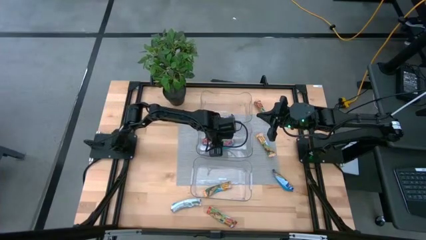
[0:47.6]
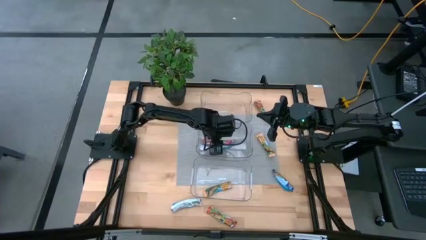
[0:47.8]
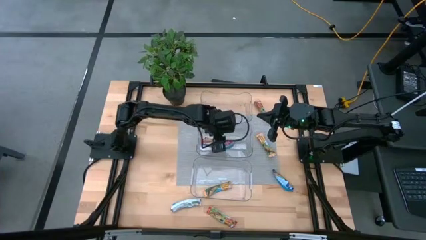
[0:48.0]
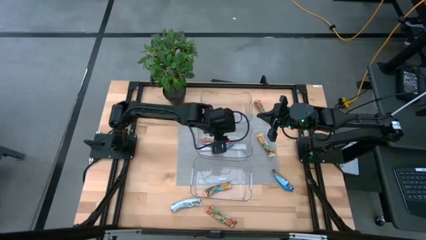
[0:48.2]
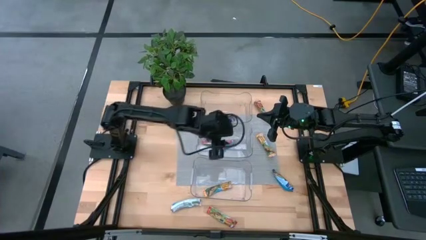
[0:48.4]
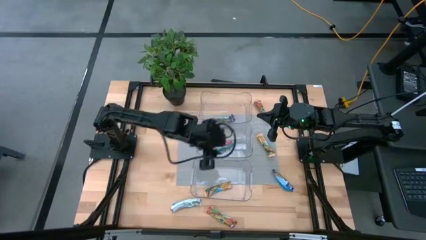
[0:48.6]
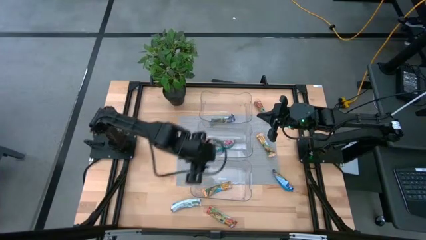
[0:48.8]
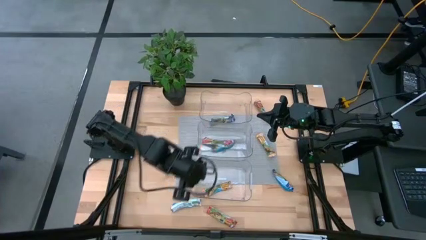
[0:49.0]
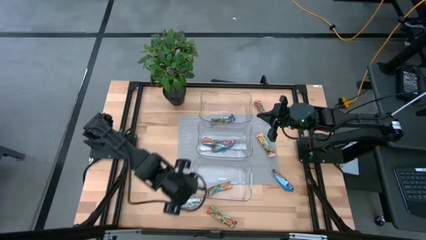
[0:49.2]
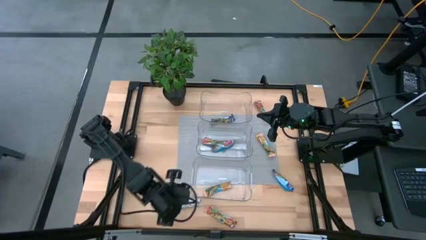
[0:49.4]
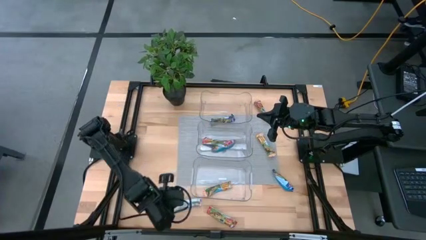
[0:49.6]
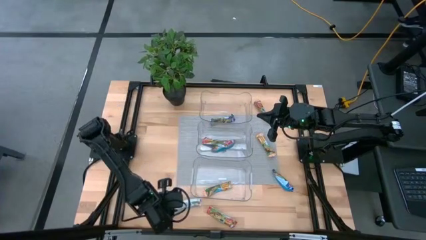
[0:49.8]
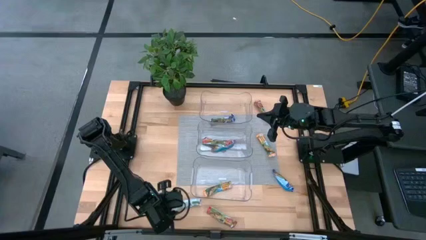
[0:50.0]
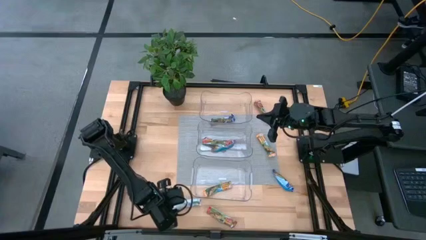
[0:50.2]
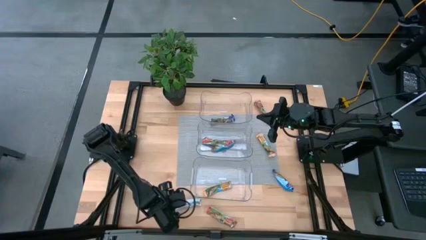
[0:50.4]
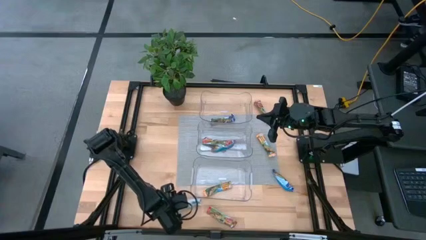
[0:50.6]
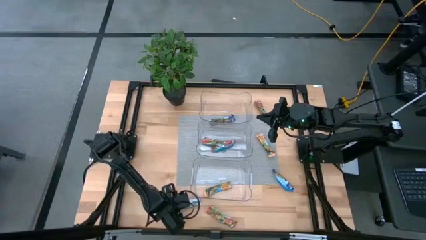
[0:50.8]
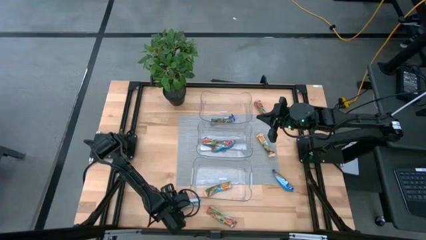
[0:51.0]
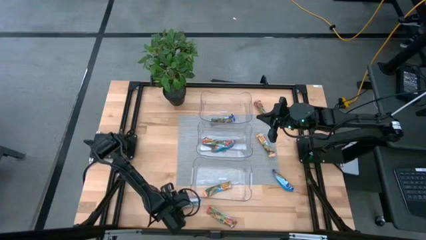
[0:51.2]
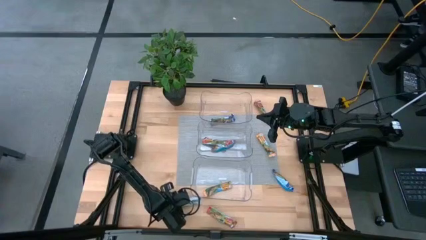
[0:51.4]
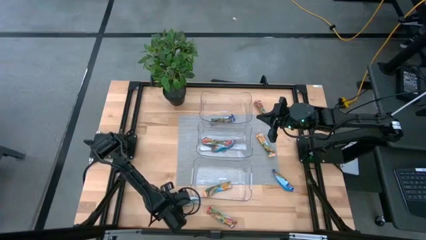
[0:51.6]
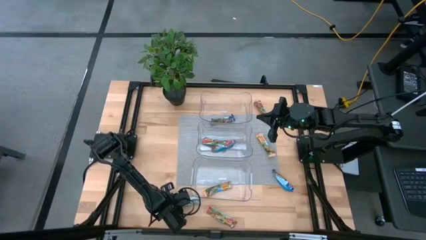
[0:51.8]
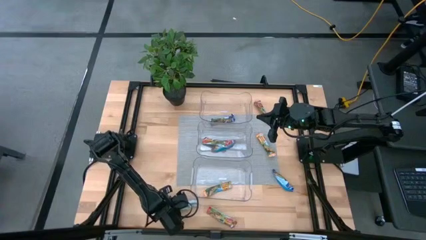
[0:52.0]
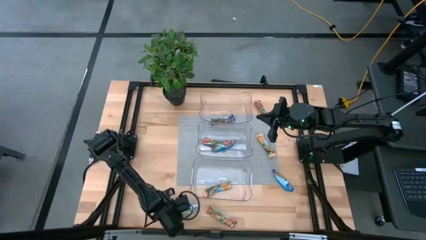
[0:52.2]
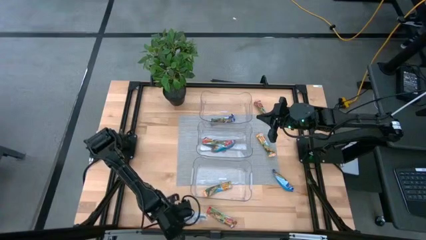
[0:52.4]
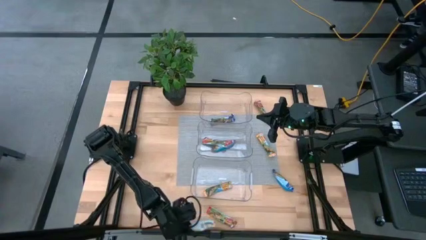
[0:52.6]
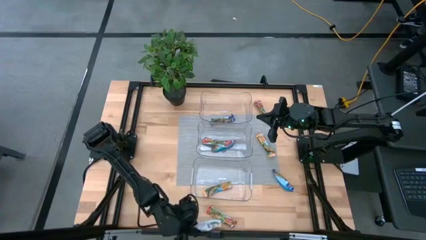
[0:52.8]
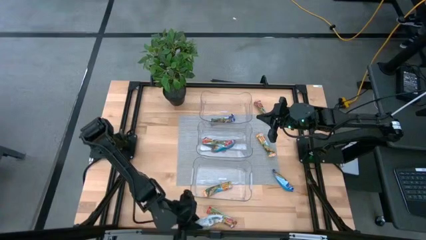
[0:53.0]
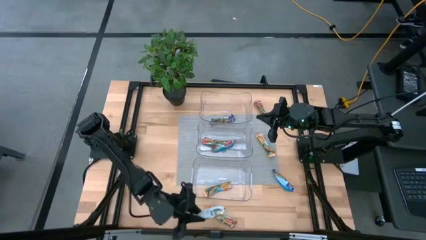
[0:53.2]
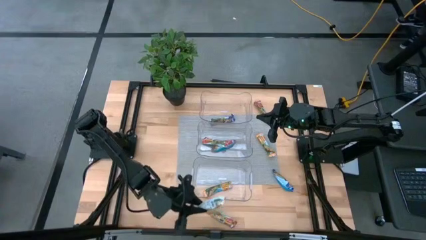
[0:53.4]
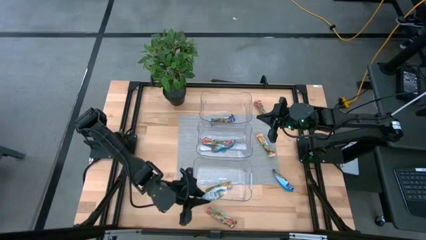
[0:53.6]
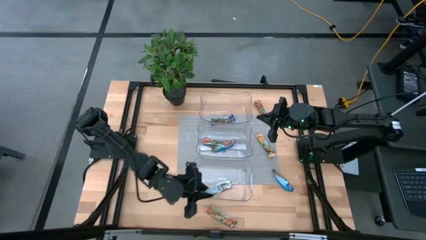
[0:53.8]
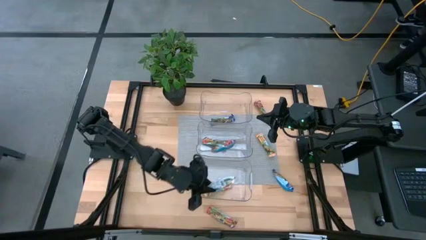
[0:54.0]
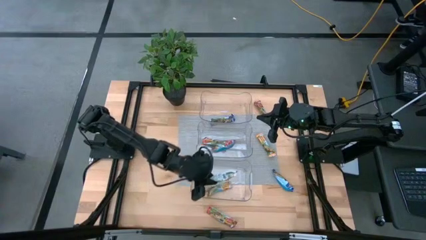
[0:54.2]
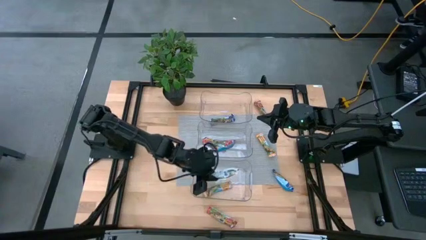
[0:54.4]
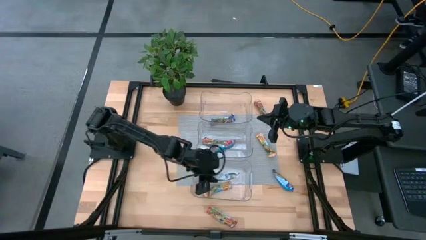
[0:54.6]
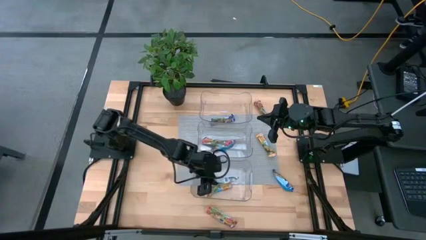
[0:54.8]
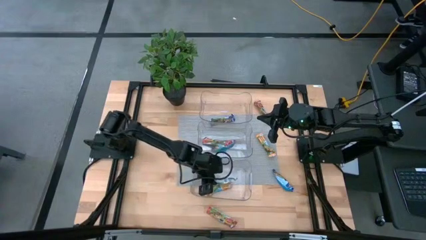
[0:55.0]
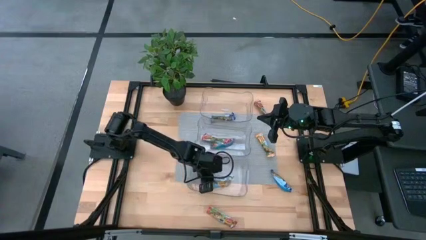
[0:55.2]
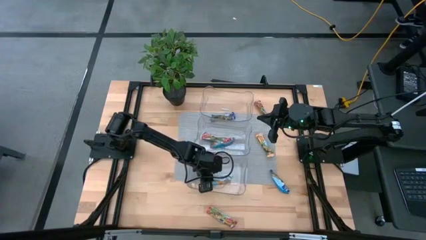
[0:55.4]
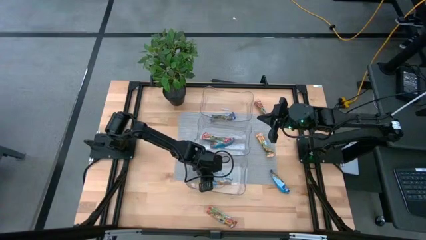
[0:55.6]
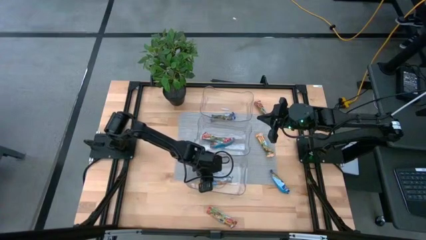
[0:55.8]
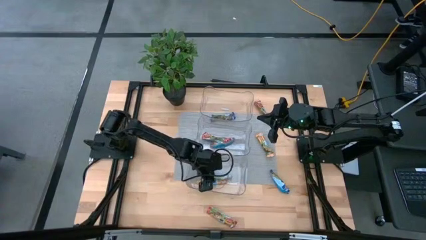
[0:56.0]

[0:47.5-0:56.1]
Task: Pick and place Granola Bars by type
Put the yellow granola bar into the bottom transparent bin

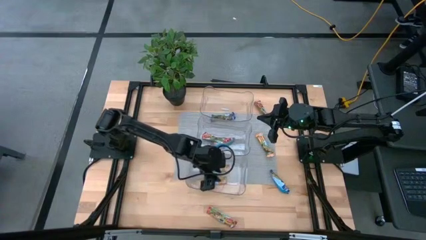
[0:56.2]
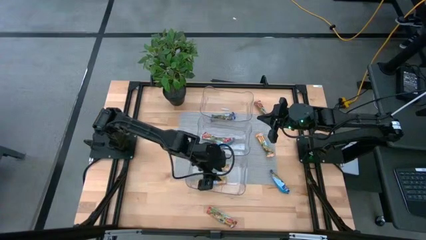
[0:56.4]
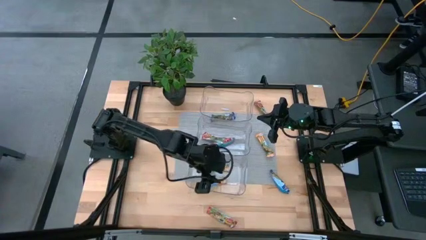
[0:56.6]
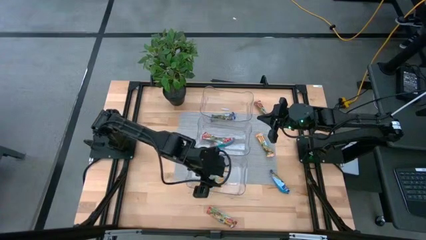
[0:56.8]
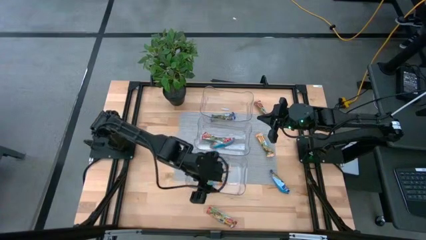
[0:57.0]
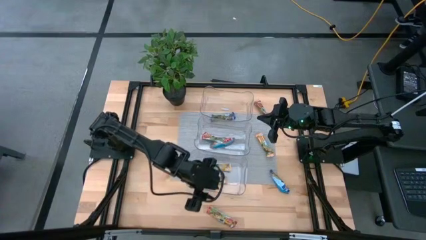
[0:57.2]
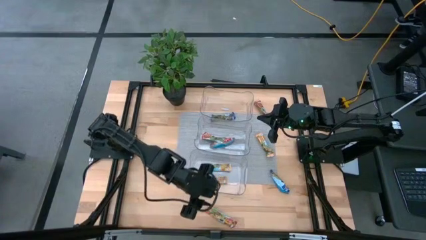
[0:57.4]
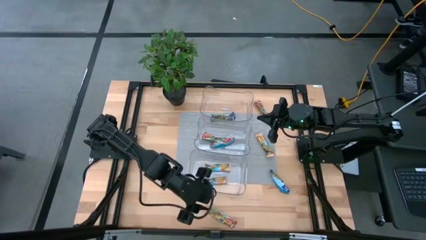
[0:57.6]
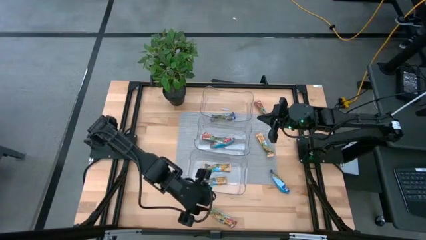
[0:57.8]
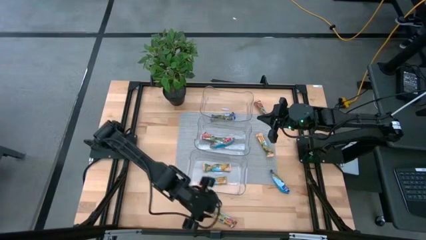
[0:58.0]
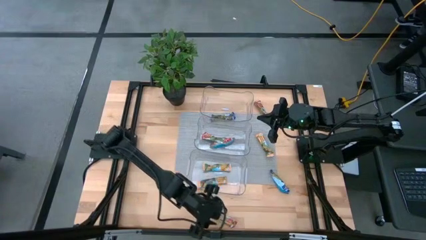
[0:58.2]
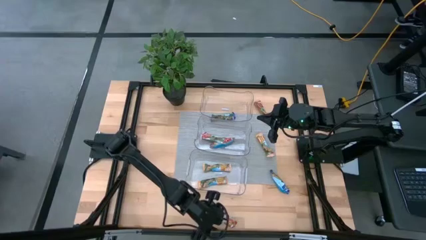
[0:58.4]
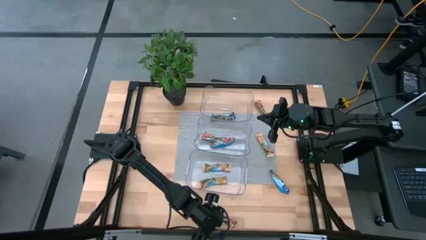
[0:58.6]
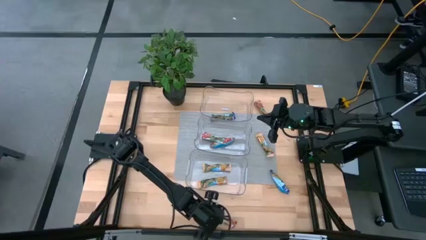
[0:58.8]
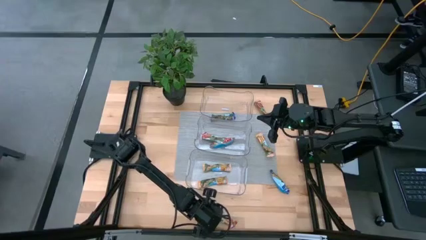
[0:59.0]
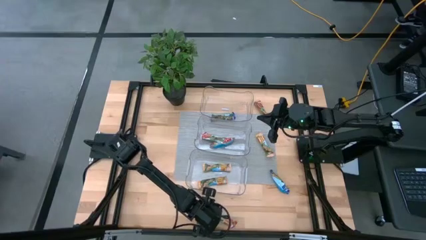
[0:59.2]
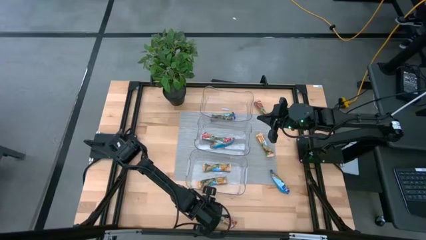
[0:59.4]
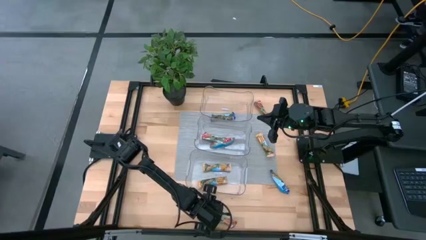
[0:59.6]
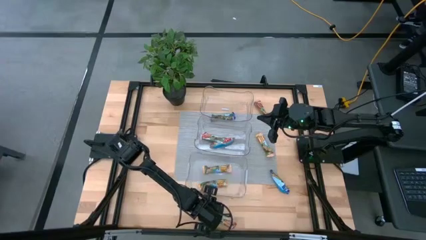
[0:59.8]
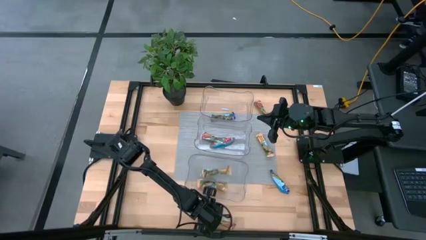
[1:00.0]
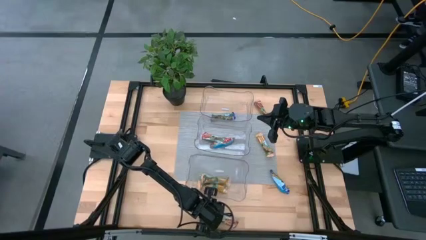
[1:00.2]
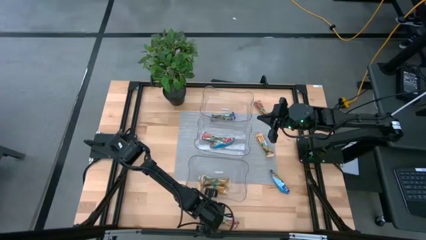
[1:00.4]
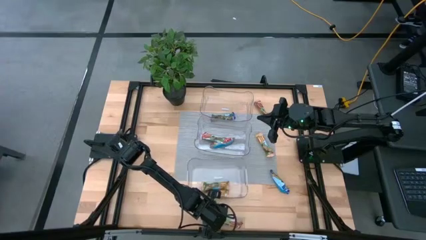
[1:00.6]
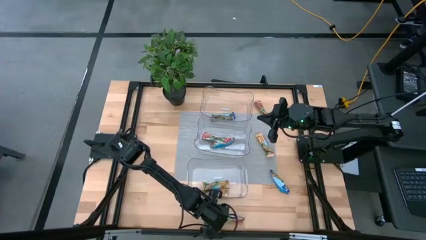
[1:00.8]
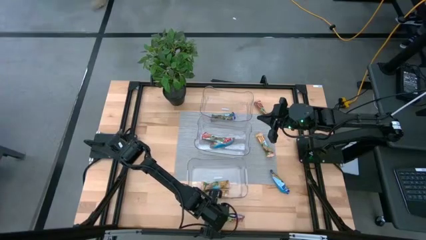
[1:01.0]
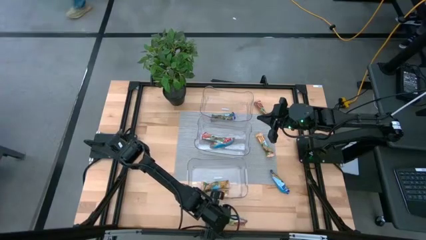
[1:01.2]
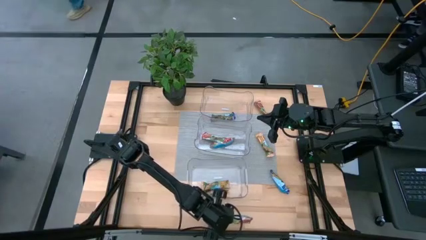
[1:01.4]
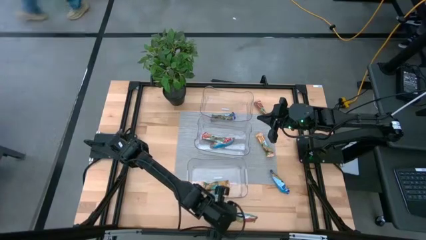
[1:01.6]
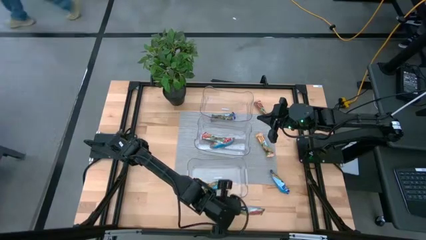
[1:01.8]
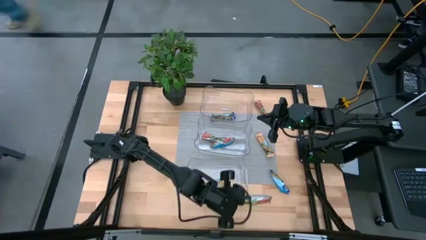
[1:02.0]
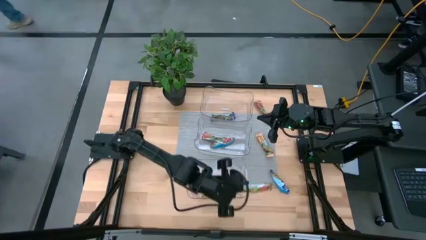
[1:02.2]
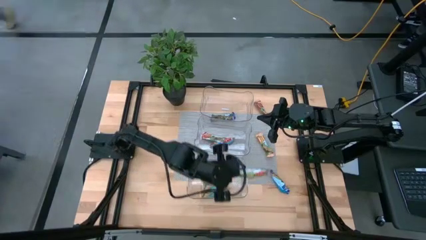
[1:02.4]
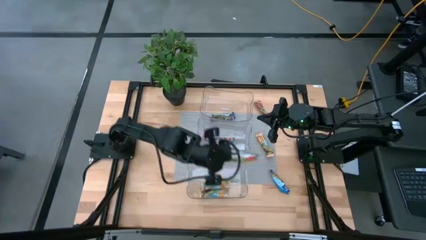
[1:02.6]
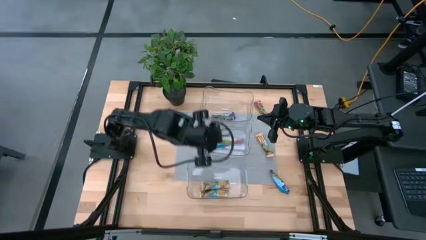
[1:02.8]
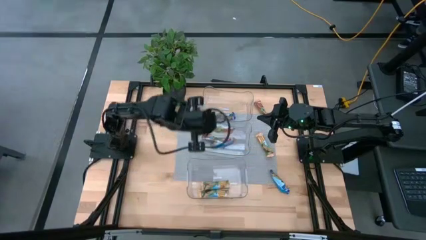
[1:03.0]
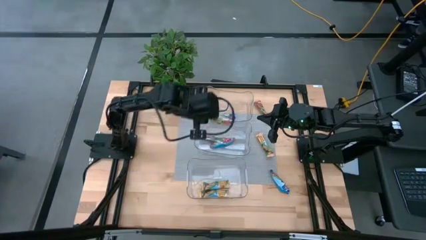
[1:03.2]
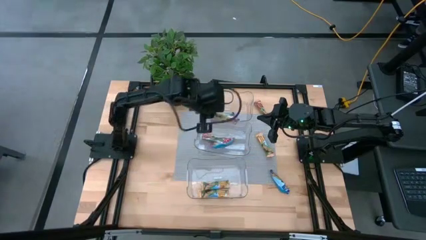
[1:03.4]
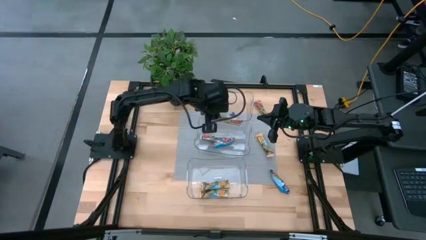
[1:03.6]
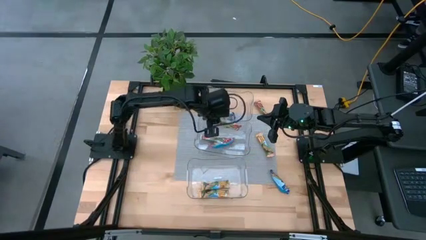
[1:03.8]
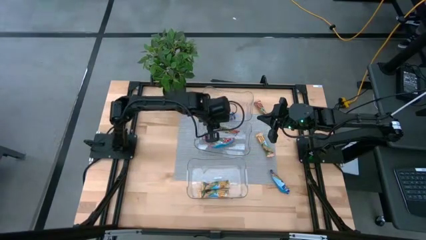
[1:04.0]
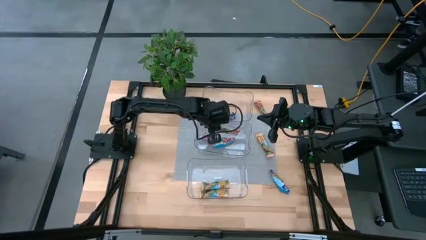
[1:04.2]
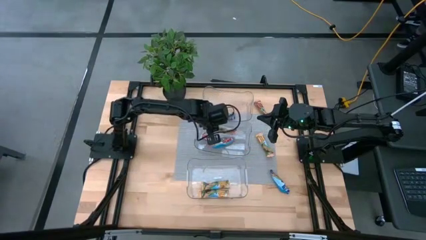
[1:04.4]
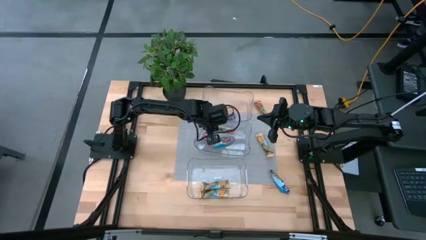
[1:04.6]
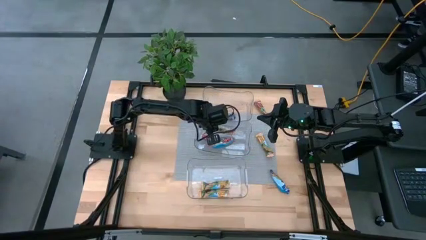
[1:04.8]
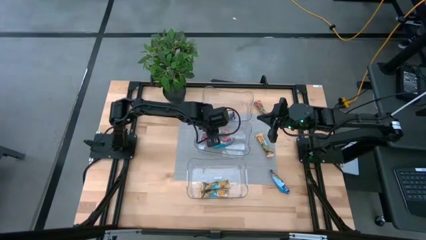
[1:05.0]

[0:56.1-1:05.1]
Put the red granola bar into the middle transparent bin
